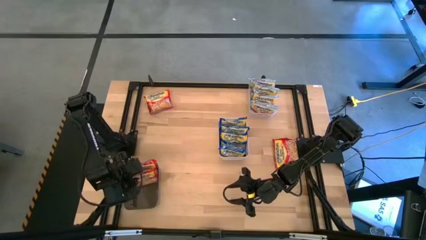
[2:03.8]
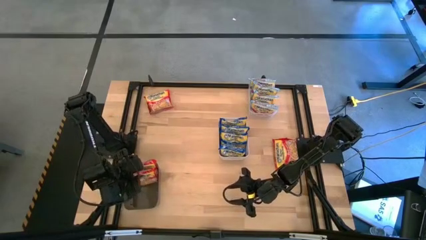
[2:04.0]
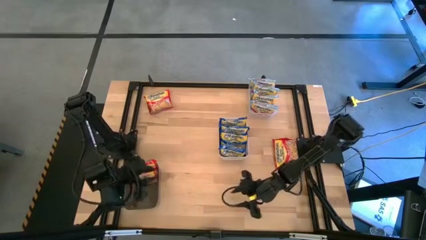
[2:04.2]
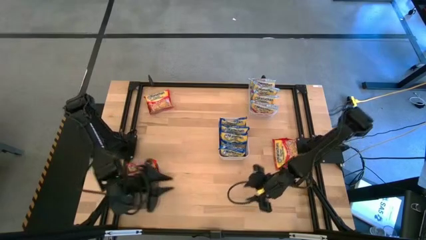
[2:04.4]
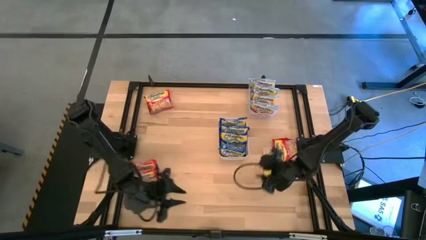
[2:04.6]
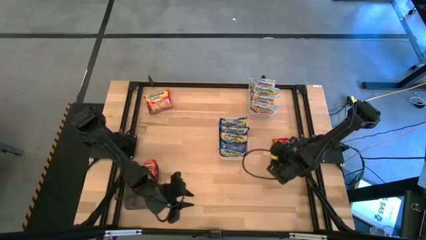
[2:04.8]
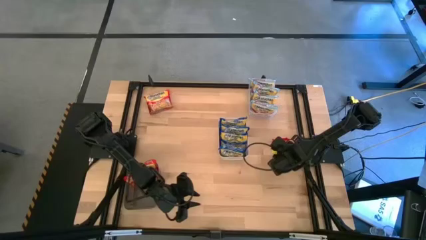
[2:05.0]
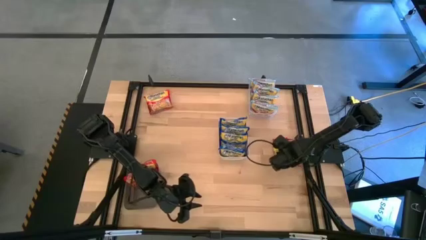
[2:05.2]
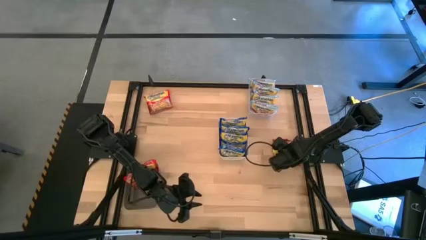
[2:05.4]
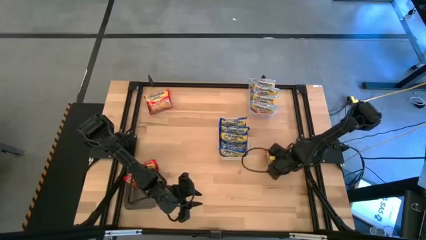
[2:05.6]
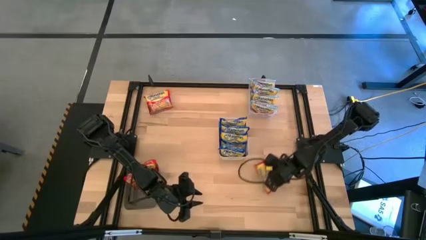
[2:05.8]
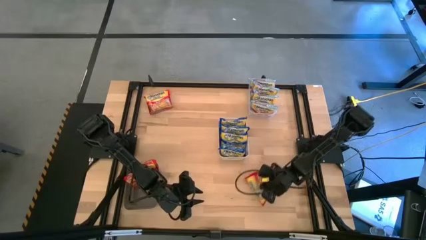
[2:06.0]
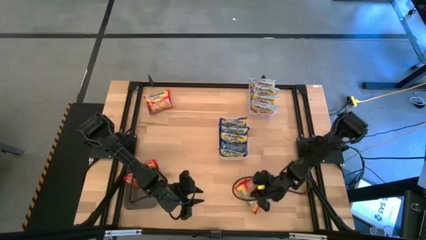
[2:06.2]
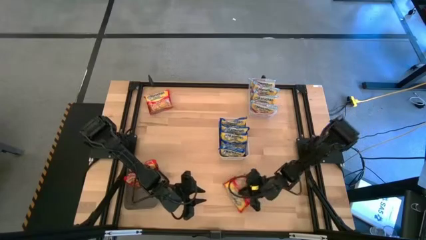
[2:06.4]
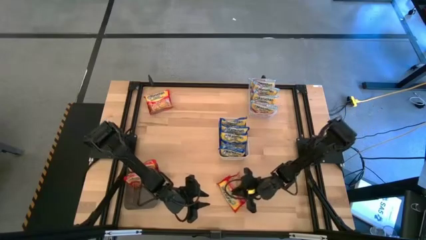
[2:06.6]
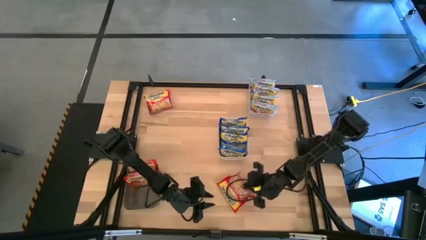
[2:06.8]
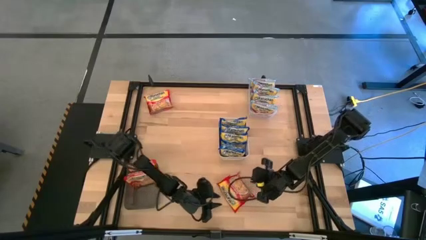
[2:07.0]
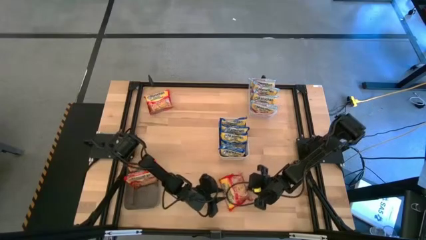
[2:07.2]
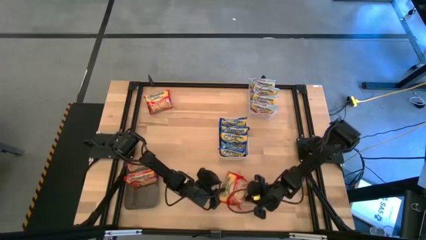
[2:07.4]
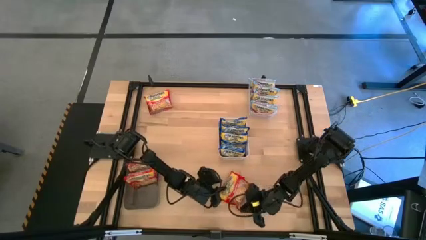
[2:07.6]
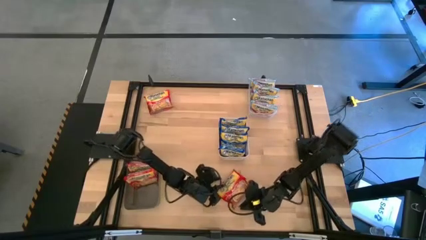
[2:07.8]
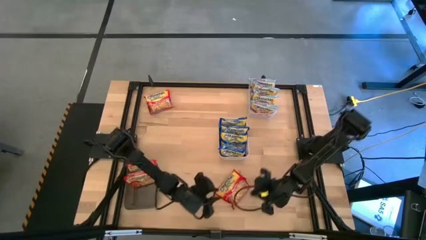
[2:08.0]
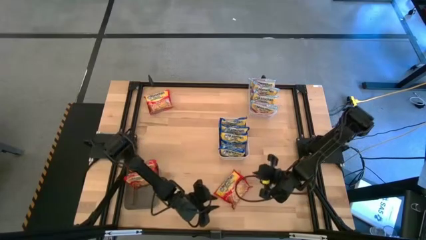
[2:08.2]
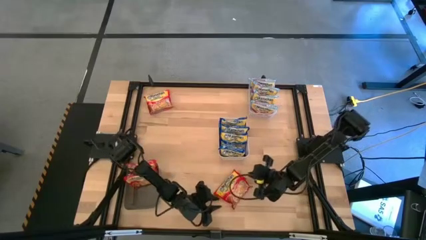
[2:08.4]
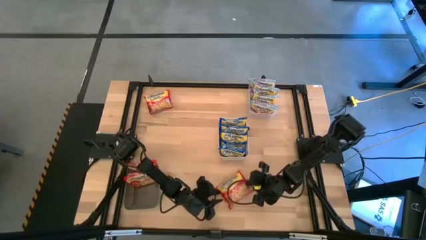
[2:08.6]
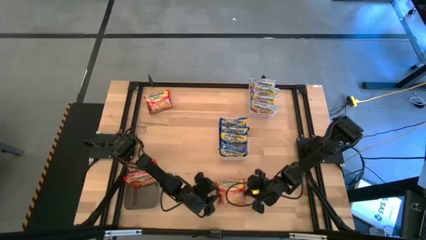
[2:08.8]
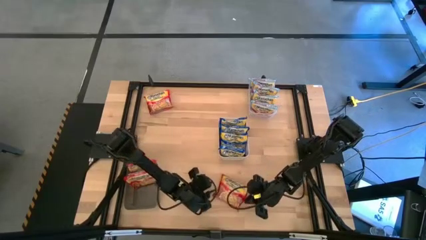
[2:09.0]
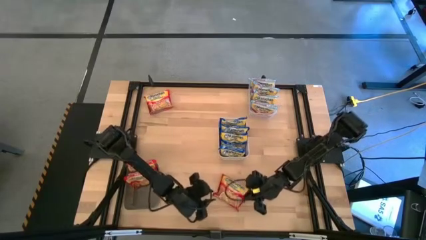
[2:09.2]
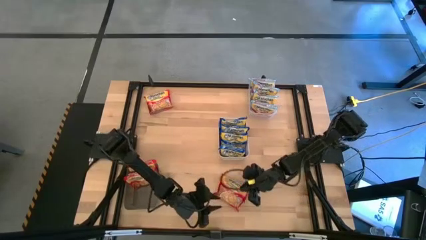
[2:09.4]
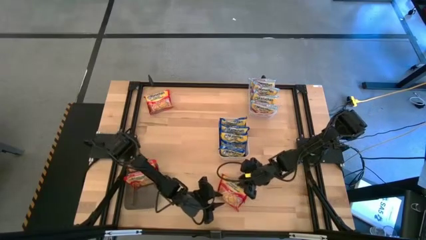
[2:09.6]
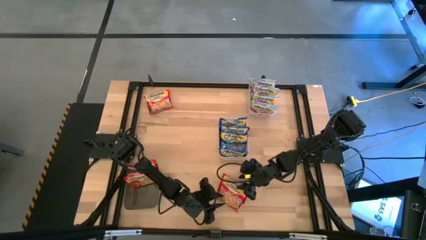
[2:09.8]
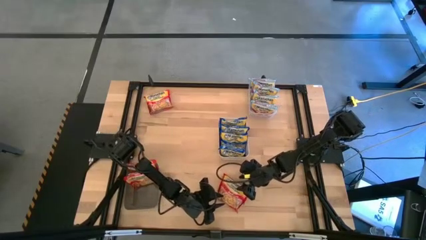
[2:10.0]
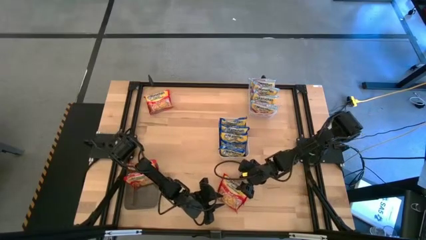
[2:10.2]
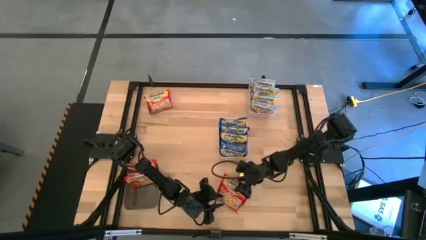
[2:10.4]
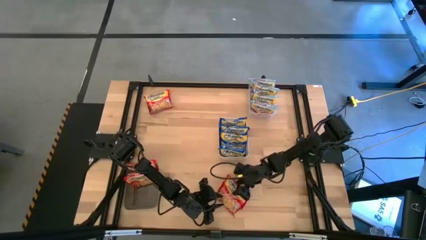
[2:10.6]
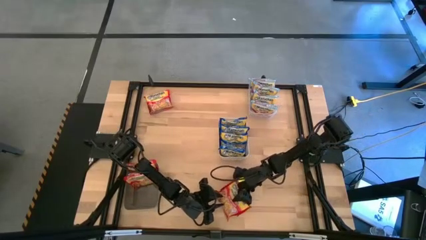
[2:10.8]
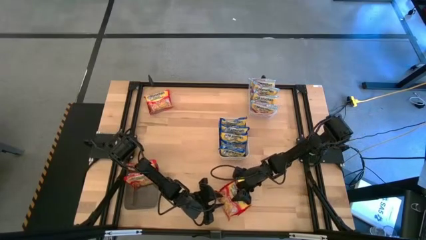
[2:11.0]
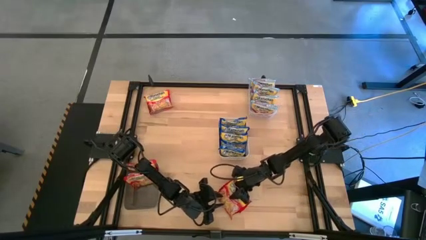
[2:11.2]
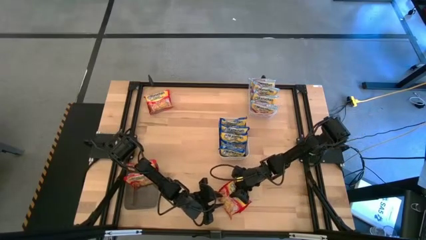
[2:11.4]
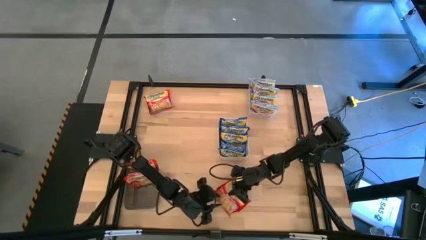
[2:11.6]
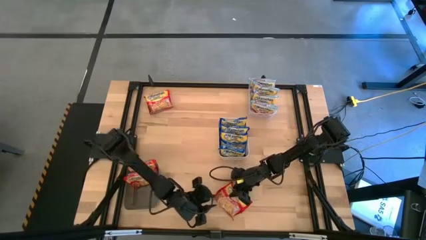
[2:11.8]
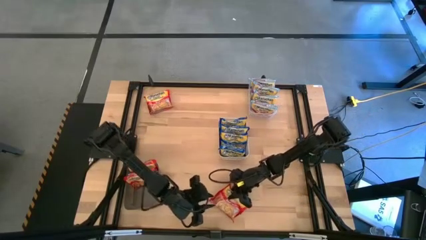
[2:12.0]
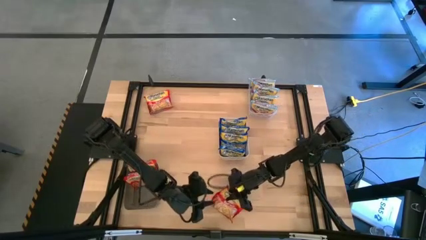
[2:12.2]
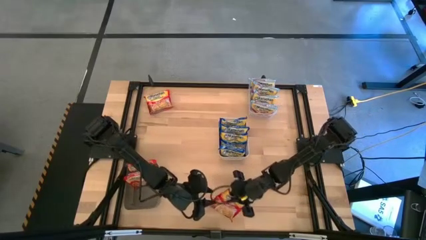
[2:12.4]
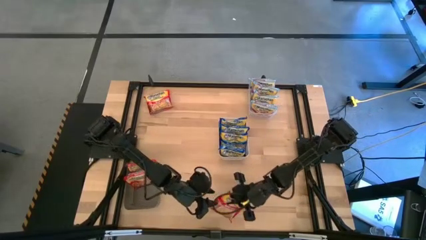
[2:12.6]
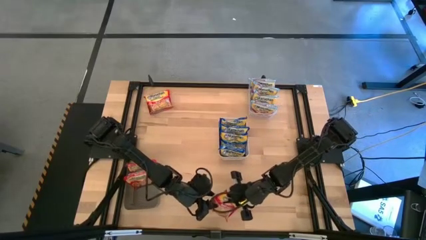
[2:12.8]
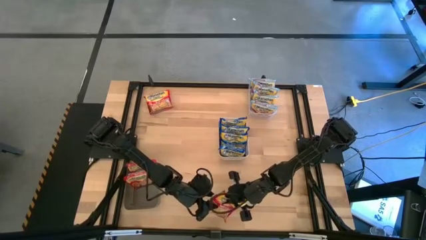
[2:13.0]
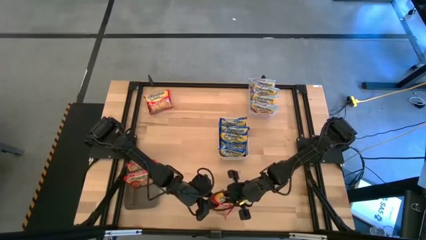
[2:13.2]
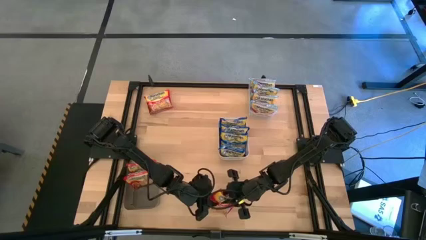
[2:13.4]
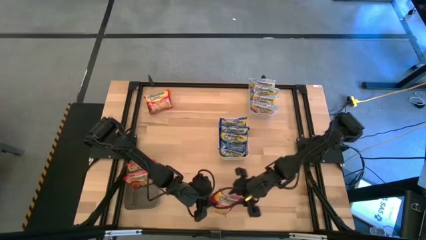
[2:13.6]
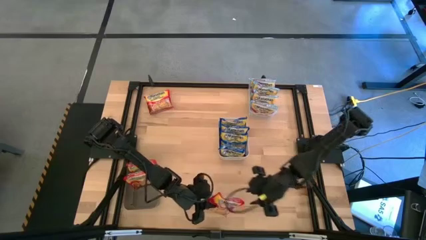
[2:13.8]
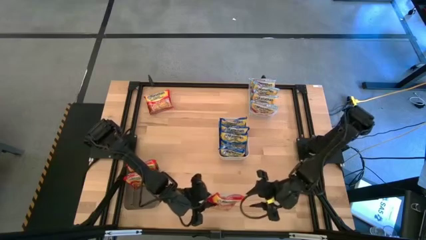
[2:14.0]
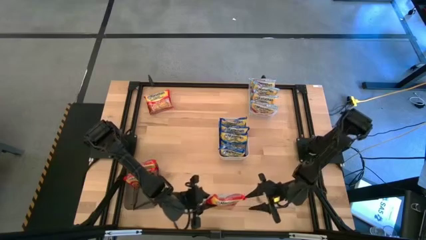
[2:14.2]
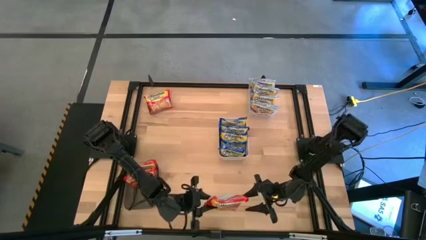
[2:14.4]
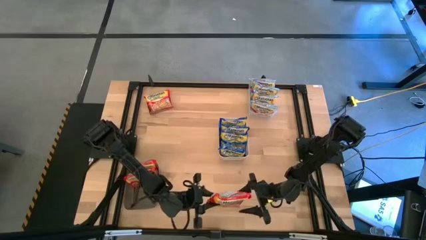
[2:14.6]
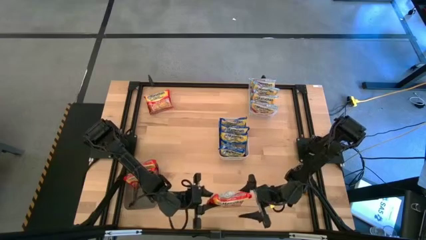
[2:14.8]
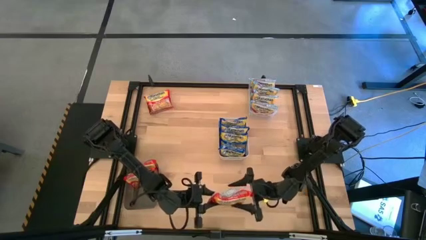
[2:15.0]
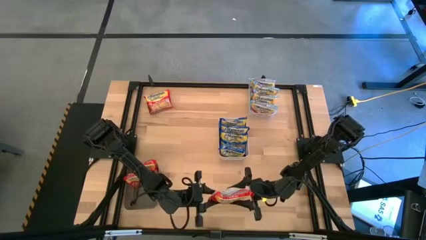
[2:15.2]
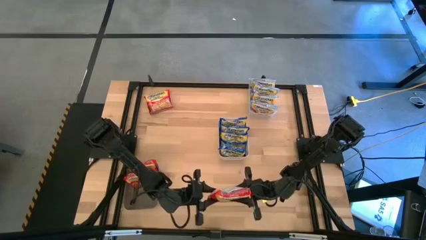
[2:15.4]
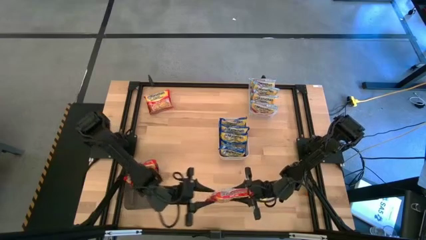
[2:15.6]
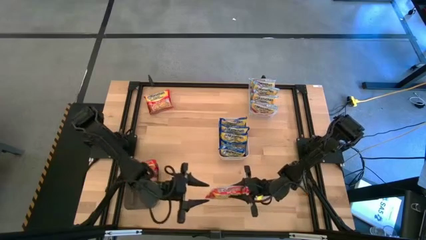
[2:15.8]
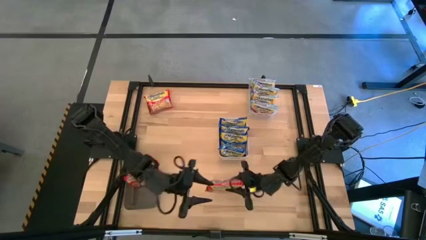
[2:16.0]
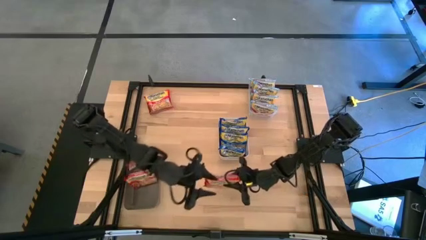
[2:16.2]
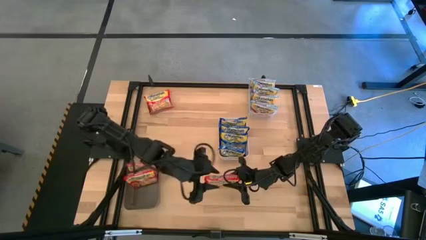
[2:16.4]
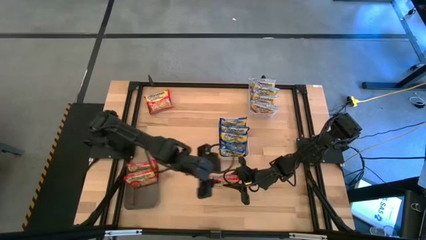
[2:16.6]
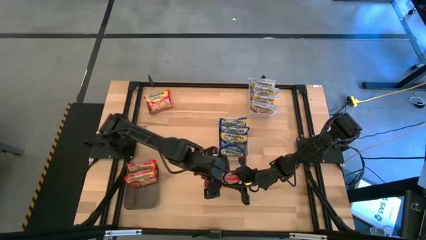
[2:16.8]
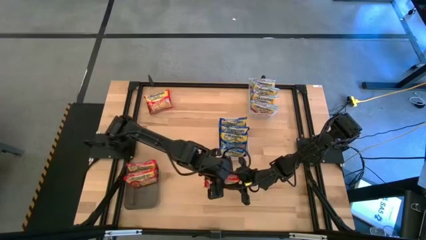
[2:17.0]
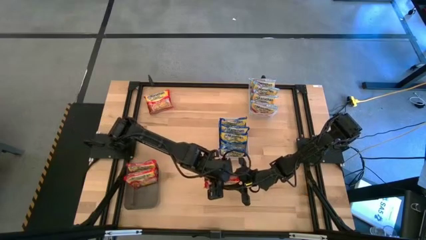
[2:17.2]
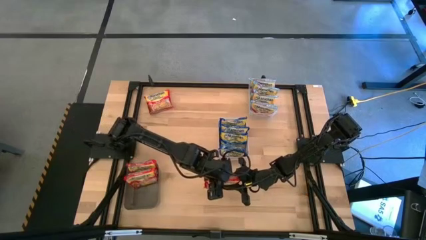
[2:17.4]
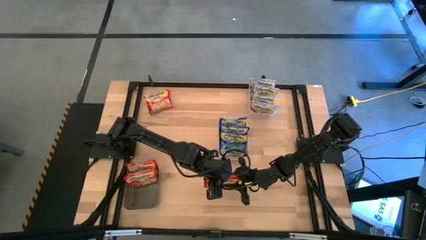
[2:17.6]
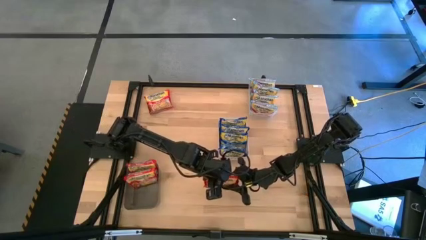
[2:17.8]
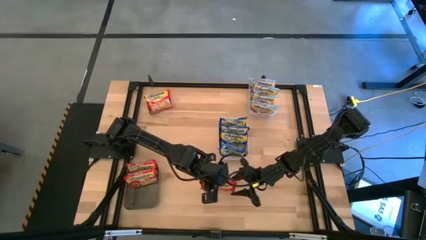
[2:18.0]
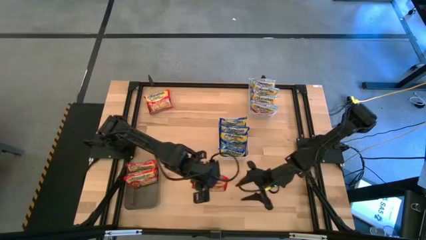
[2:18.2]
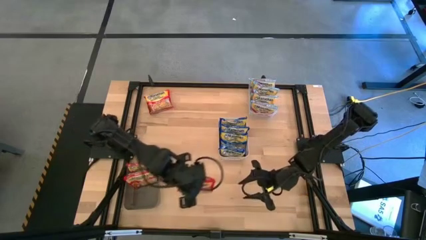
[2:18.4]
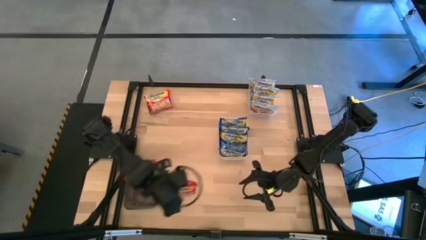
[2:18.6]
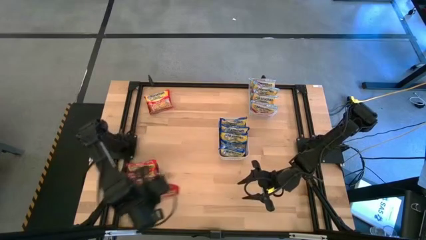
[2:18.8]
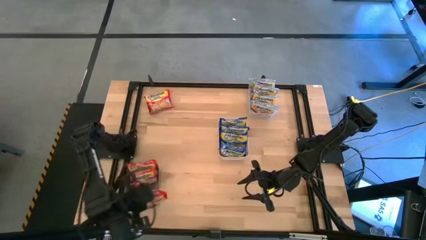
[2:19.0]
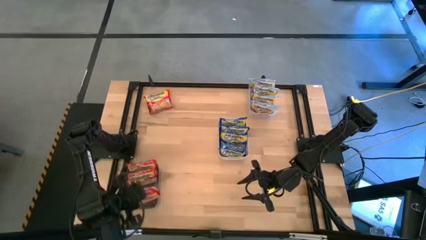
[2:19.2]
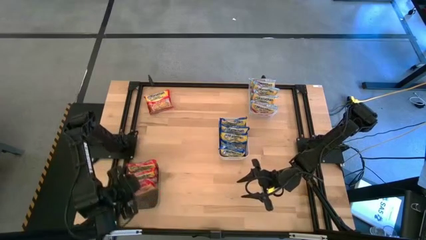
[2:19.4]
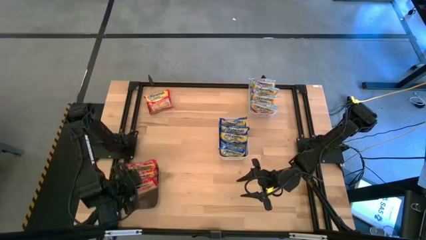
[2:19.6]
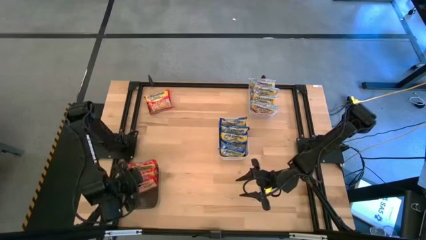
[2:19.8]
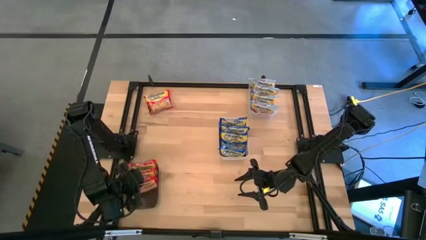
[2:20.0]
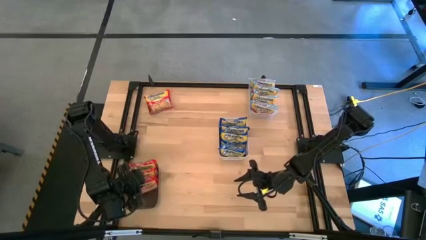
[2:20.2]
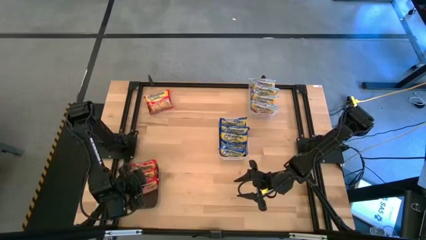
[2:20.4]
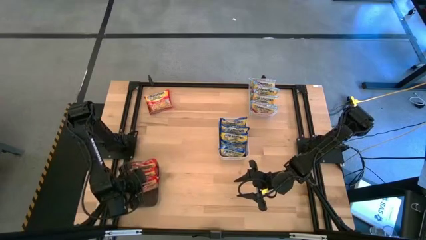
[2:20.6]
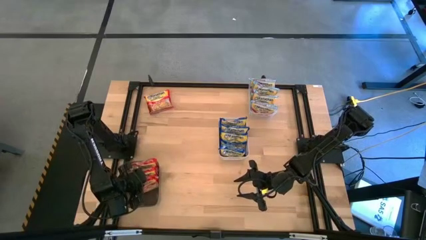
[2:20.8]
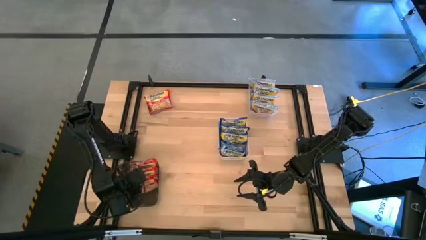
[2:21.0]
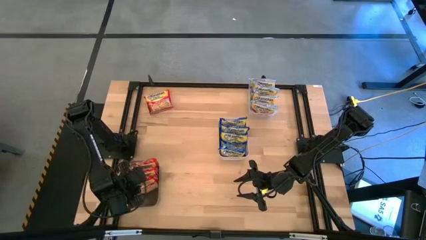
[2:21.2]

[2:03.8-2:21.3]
Task: Sort Maruchan noodles
Put the red noodle pack in the black bin
